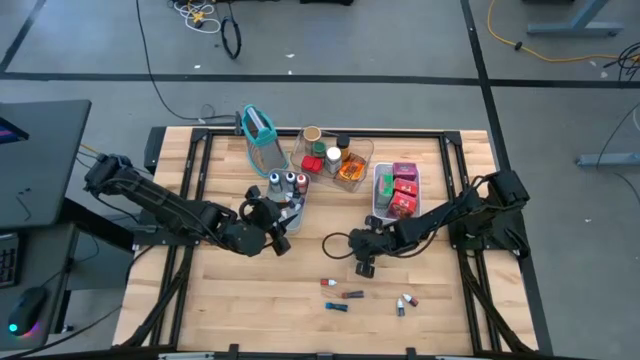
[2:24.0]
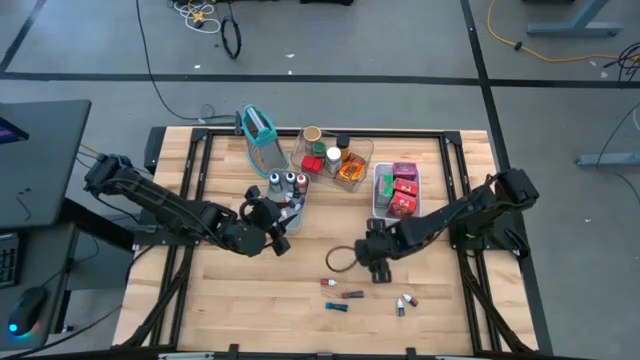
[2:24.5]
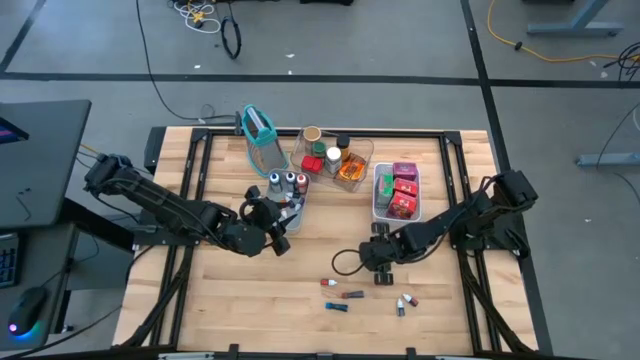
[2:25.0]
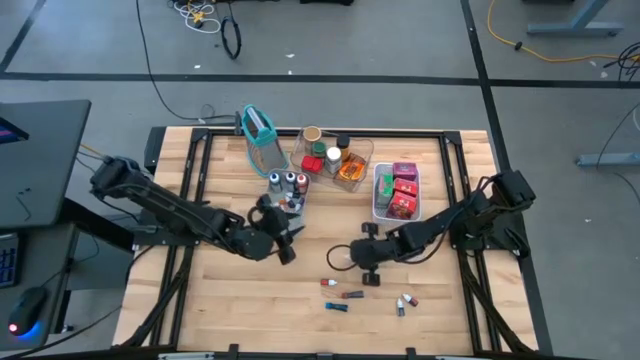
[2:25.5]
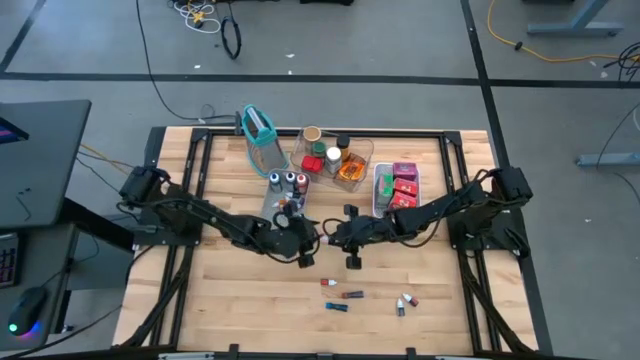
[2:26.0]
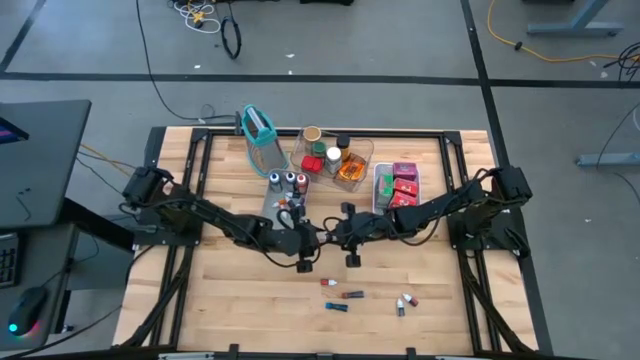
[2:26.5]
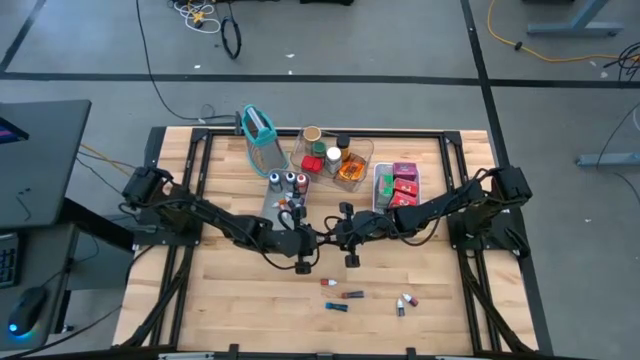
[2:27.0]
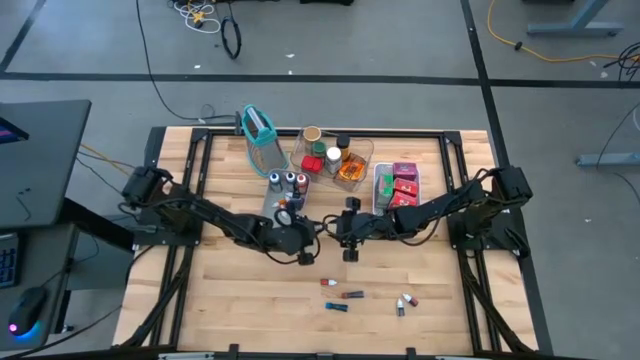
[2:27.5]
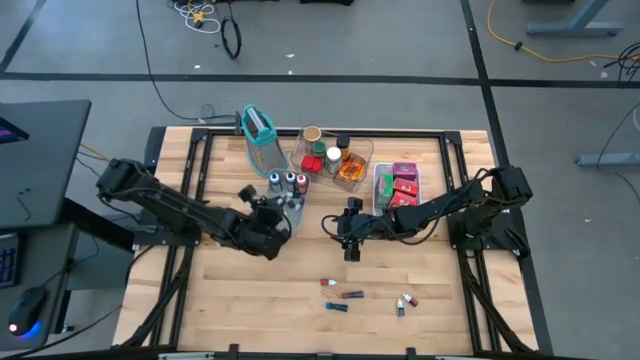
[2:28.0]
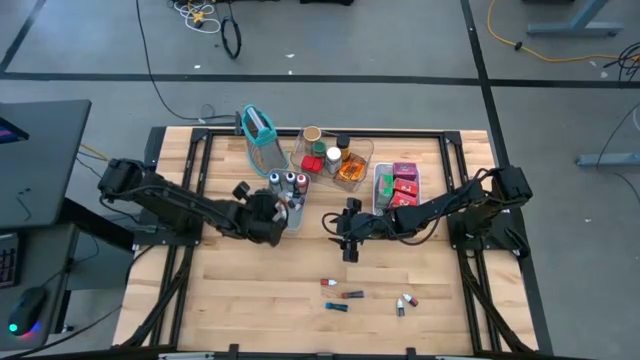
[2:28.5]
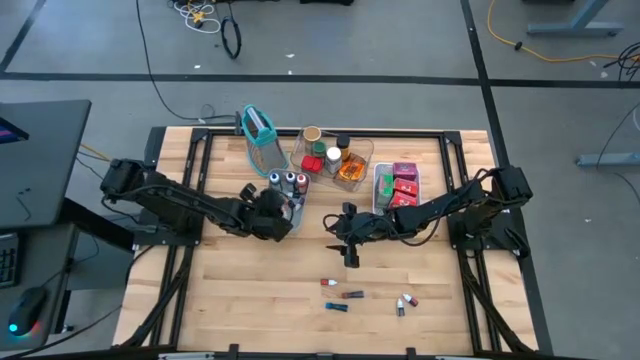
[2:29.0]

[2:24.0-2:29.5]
Task: Pick & Place Kitchen Items
Put the small brown food coloring bottle into the gray bin

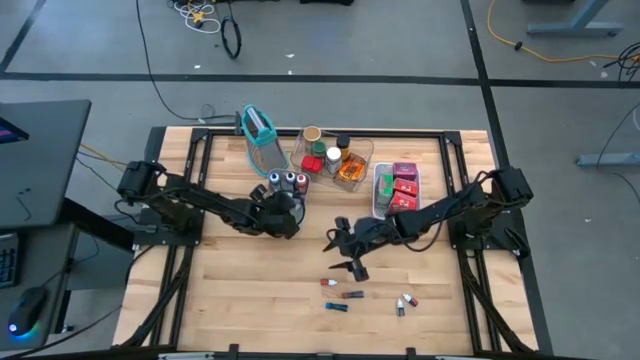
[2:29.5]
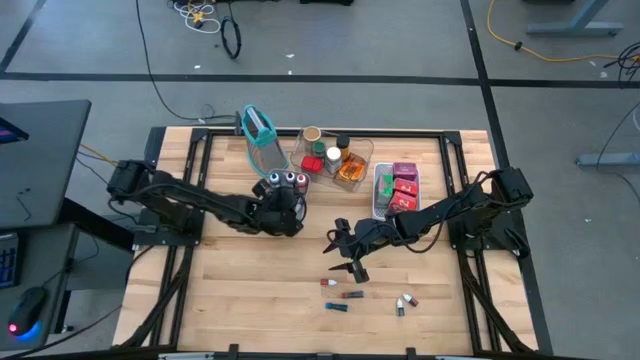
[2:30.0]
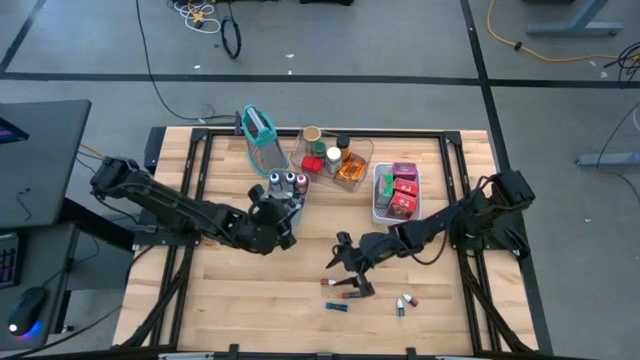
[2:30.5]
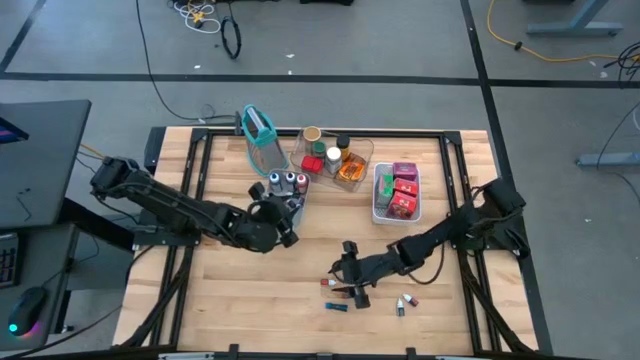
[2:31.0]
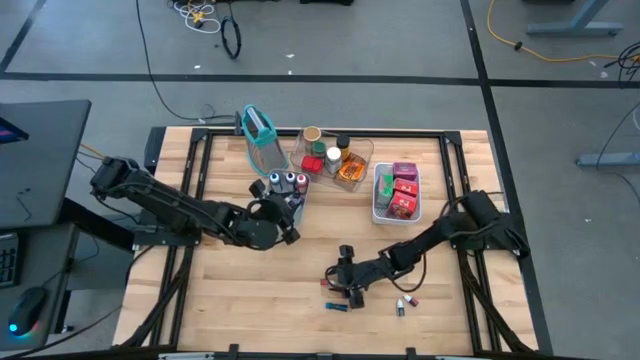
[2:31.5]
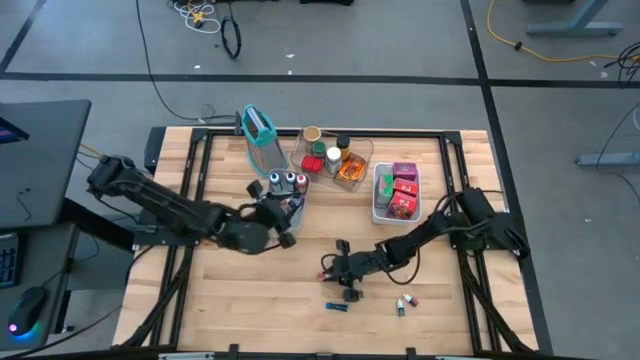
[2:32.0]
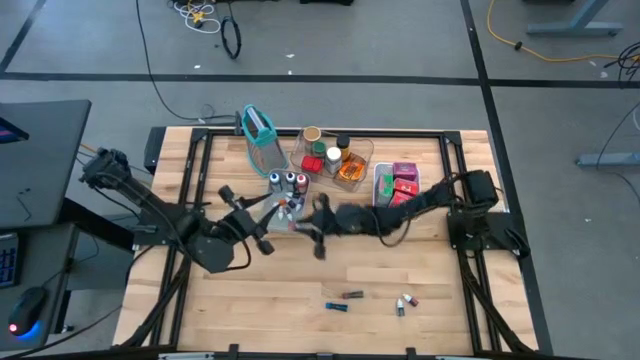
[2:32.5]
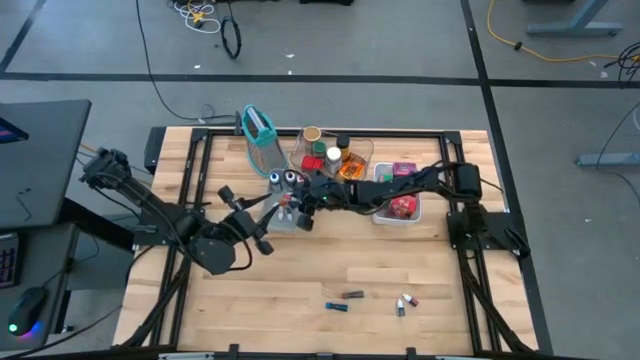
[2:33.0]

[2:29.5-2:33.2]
Put the small red food coloring bottle into the gray bin

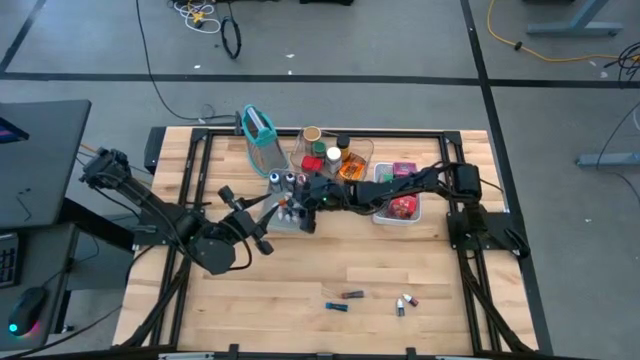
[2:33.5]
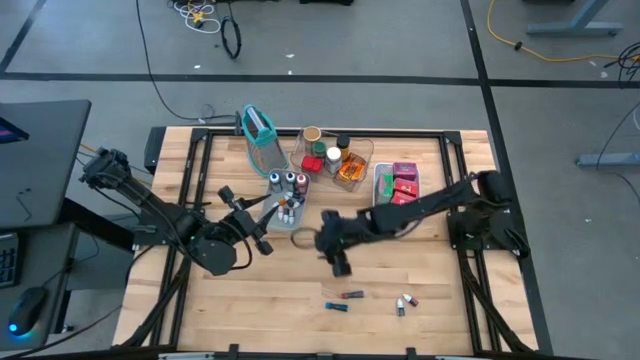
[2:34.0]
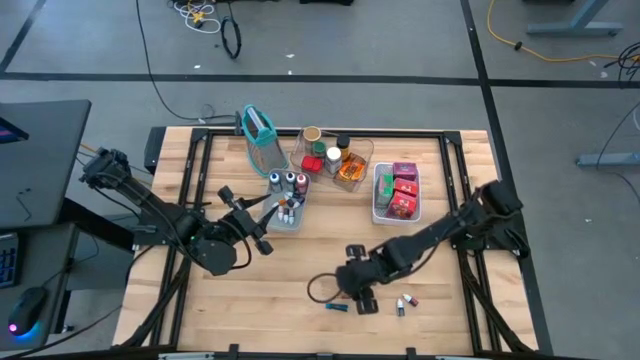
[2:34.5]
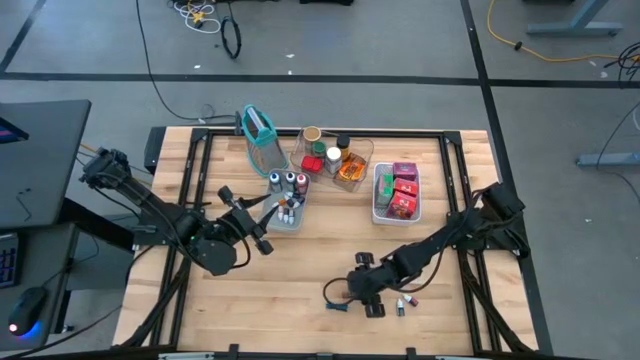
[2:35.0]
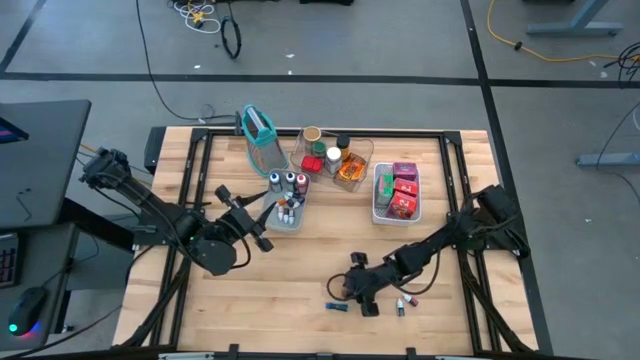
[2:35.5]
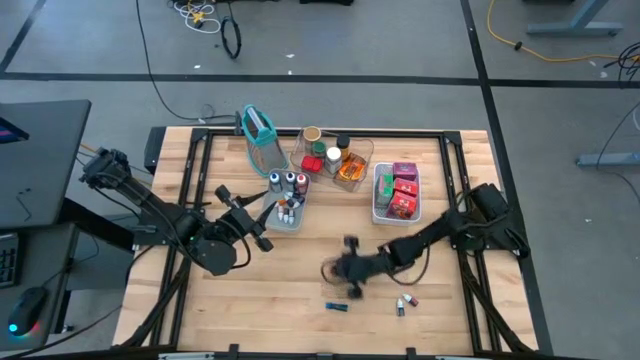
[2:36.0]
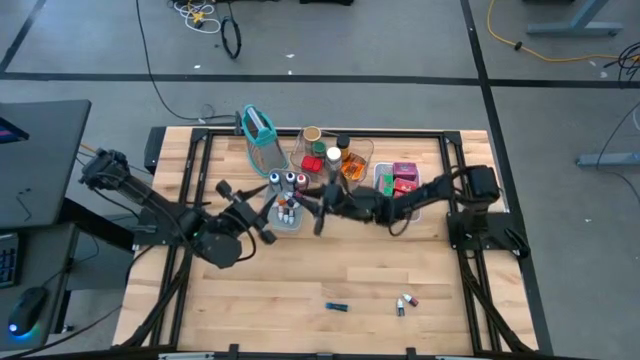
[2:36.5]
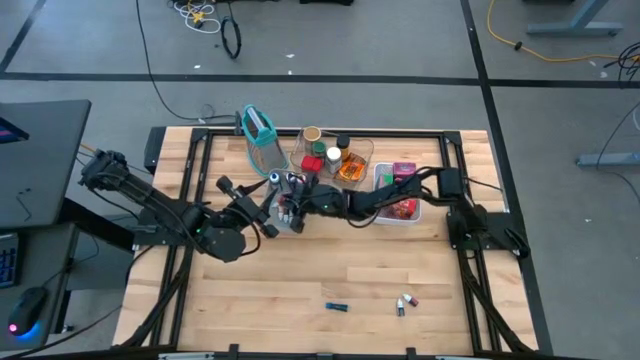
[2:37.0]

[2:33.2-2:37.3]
Put the medium red food coloring bottle into the gray bin

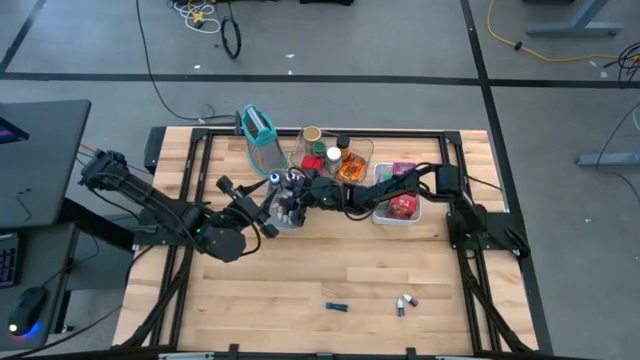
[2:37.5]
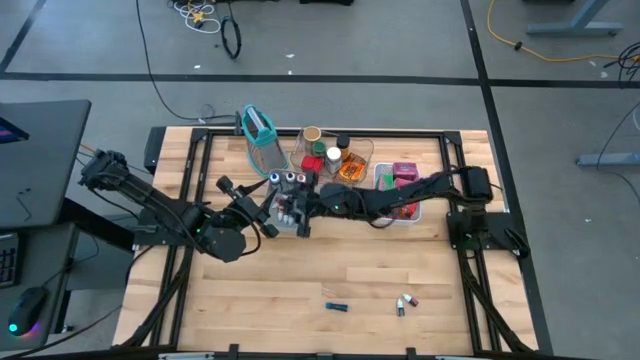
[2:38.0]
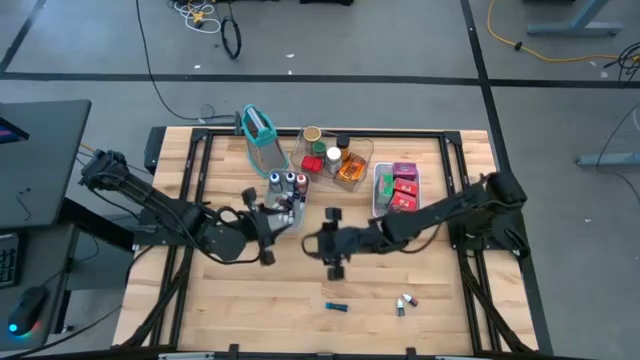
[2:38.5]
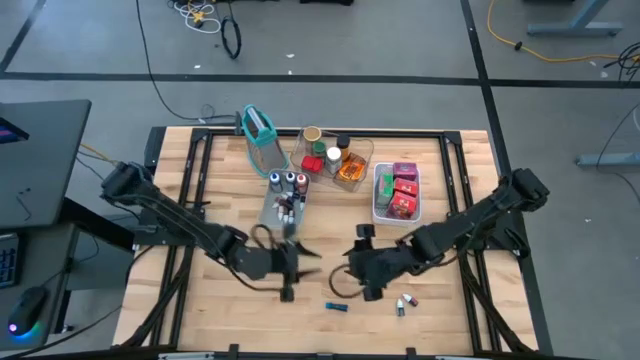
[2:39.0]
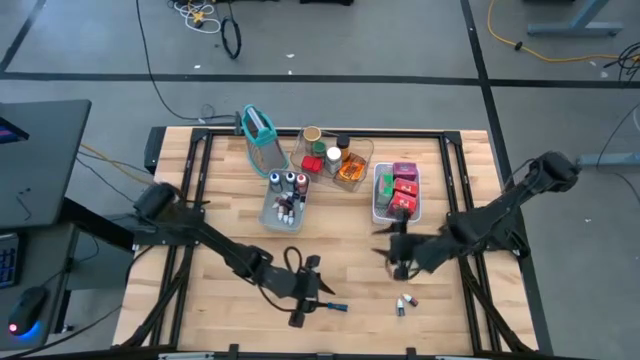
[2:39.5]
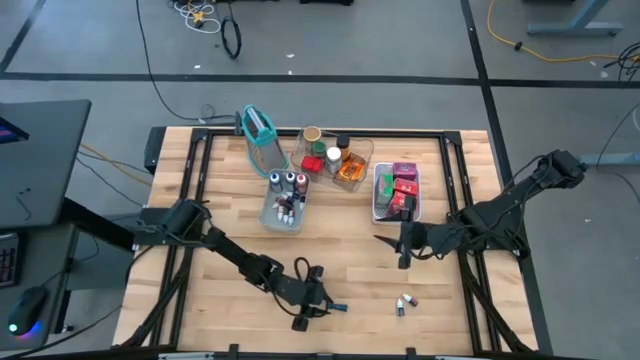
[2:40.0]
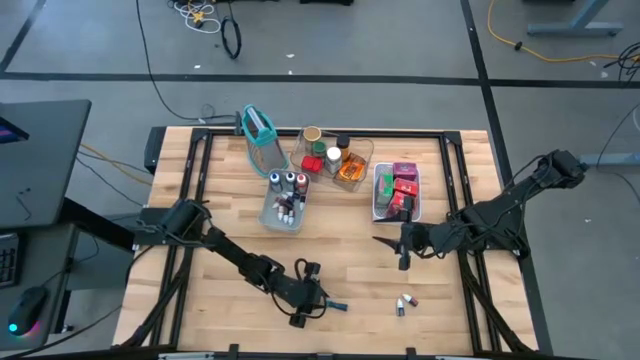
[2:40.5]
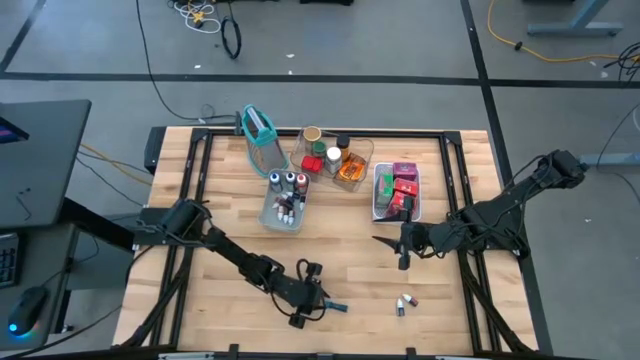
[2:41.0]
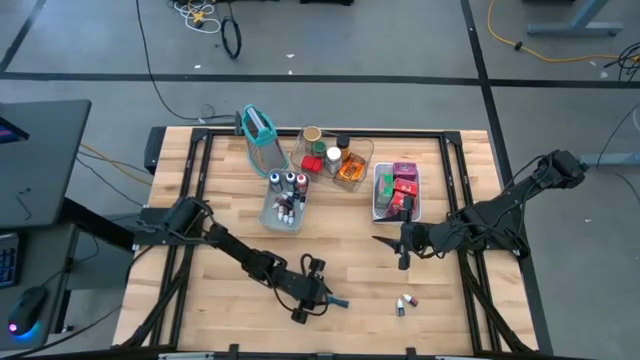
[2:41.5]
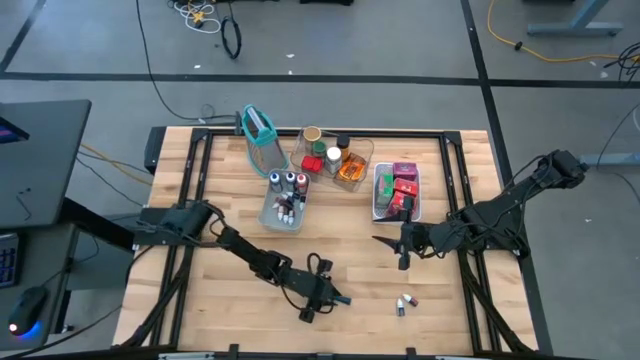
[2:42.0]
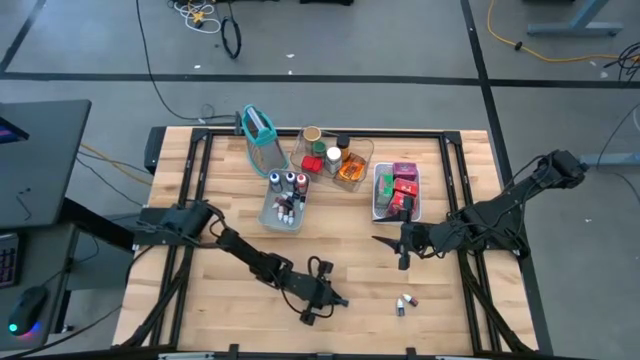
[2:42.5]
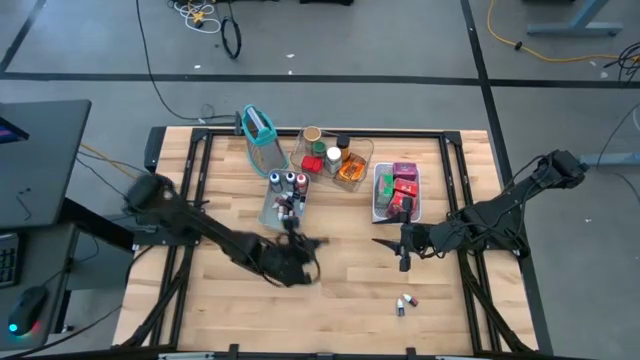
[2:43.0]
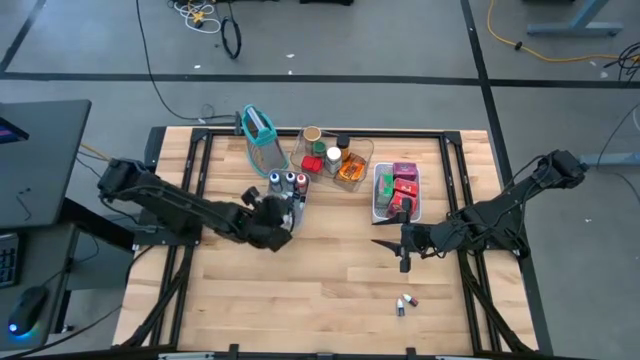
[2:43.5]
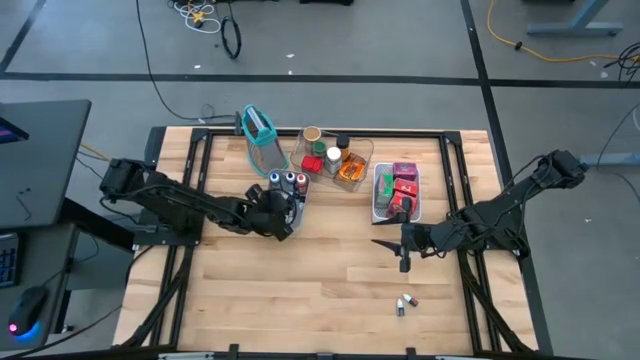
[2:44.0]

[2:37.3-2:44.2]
Put the medium blue food coloring bottle into the gray bin

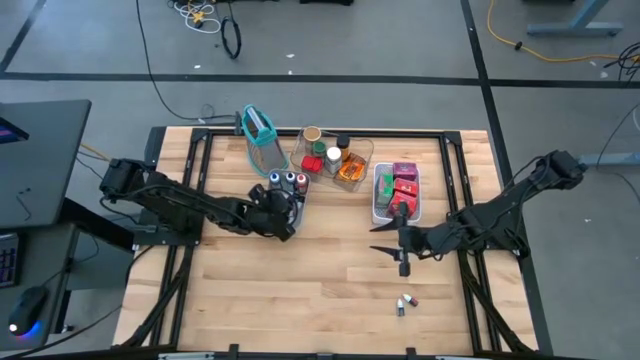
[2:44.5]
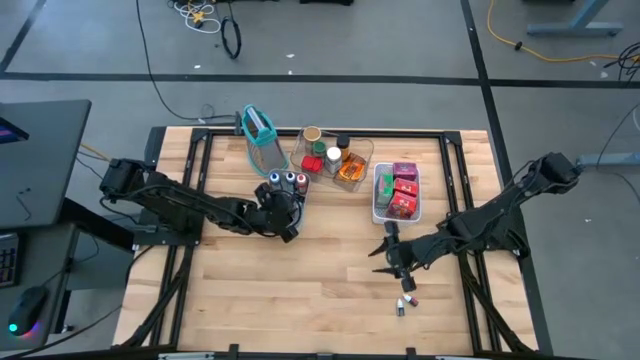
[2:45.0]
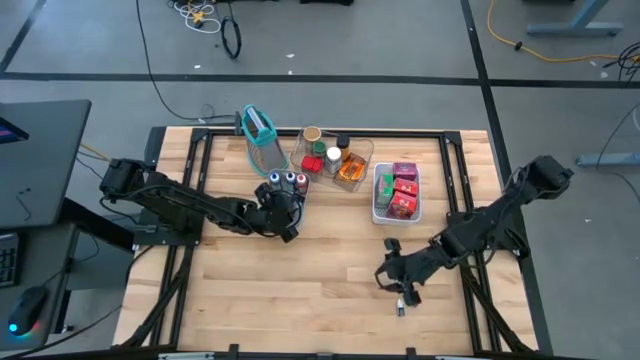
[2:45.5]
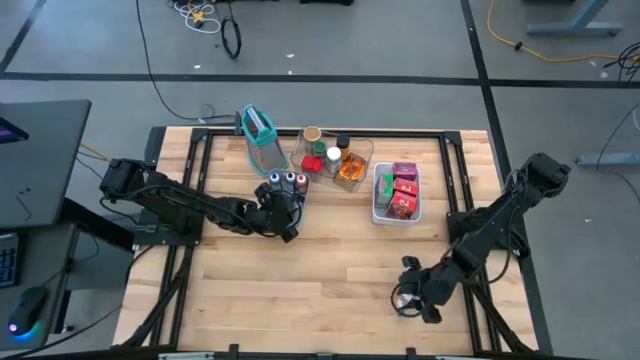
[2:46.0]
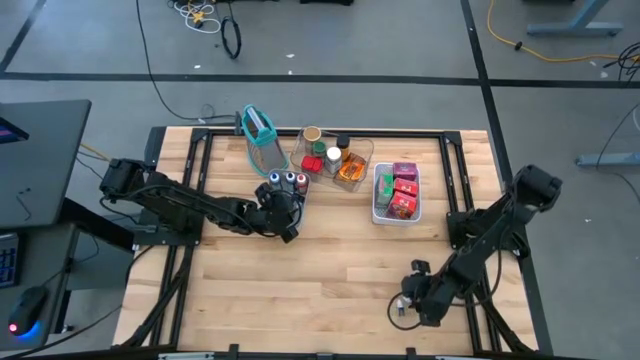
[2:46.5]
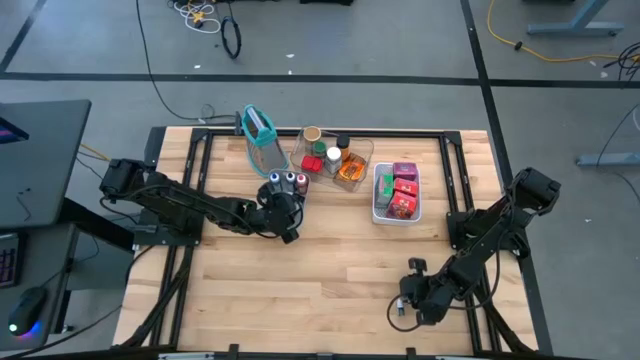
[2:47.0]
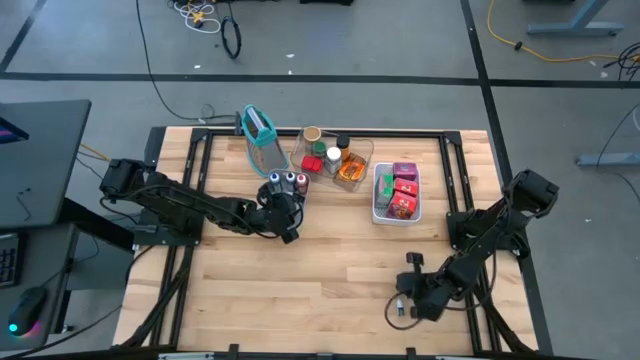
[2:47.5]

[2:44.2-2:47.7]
Put the small pink food coloring bottle into the gray bin
